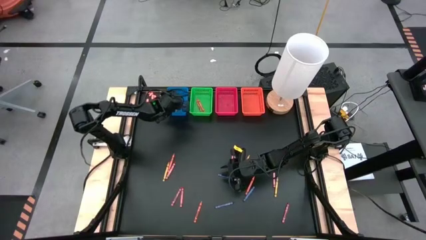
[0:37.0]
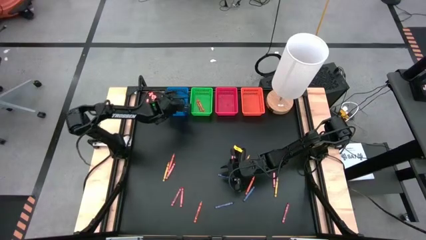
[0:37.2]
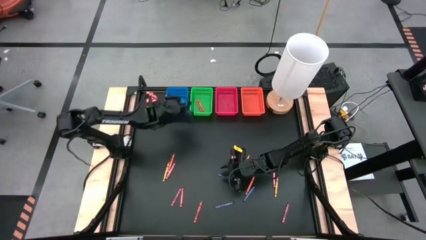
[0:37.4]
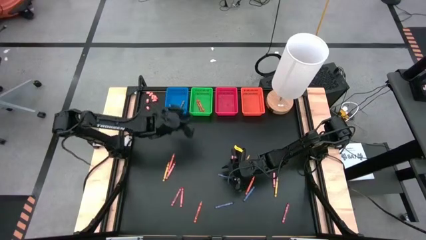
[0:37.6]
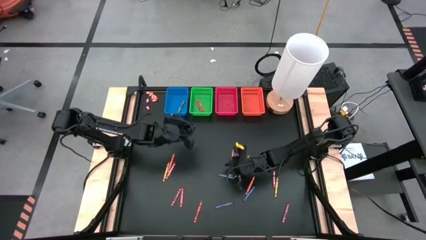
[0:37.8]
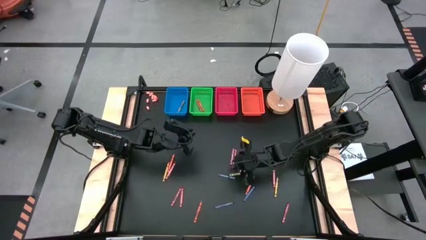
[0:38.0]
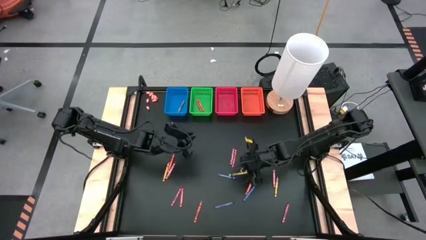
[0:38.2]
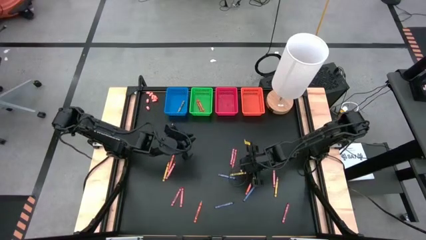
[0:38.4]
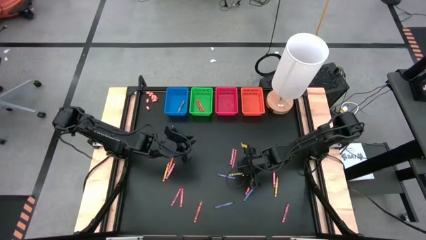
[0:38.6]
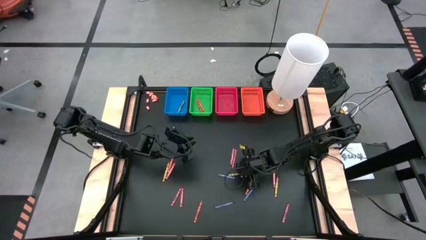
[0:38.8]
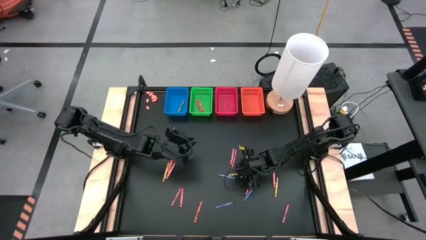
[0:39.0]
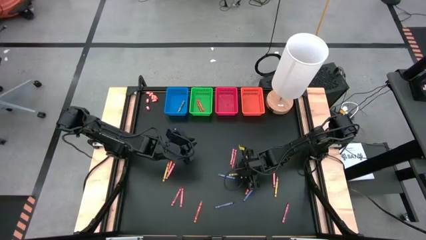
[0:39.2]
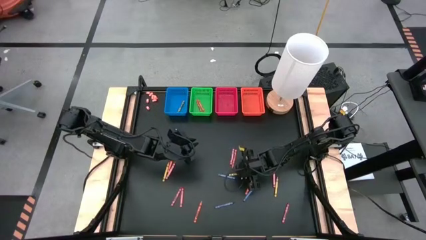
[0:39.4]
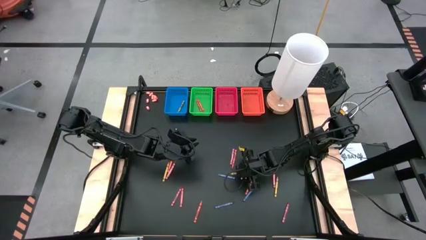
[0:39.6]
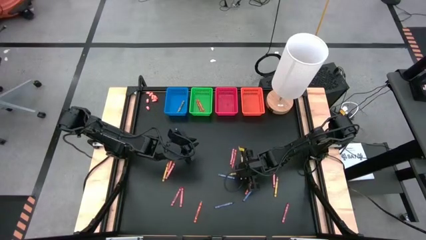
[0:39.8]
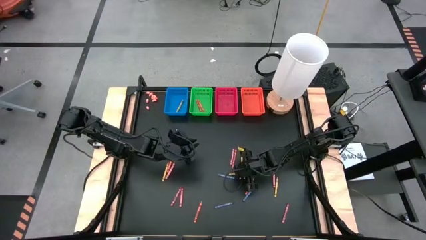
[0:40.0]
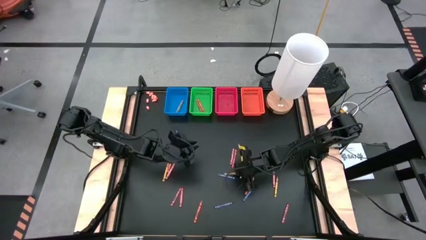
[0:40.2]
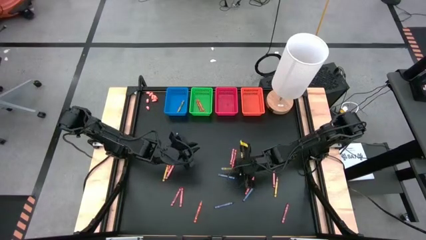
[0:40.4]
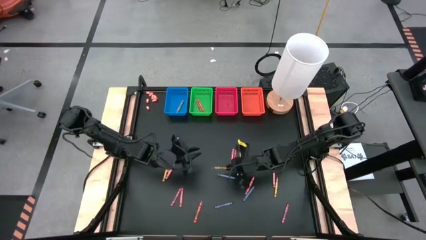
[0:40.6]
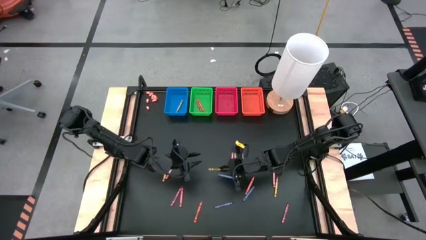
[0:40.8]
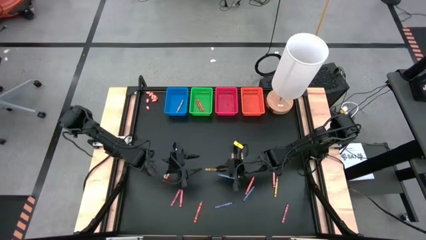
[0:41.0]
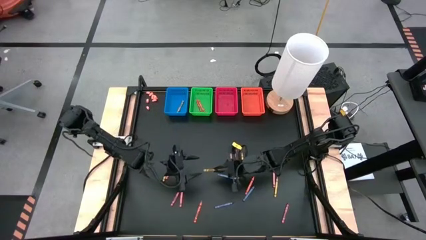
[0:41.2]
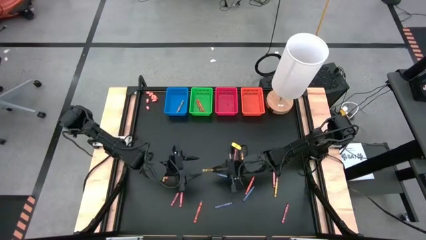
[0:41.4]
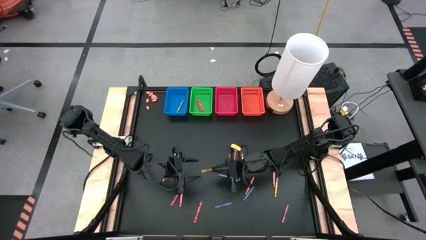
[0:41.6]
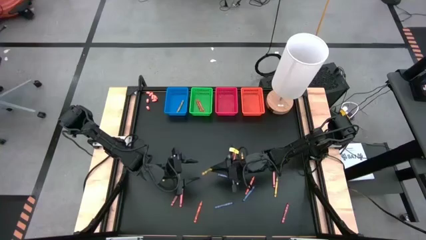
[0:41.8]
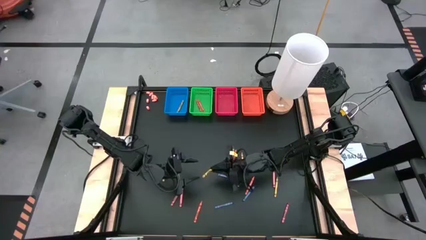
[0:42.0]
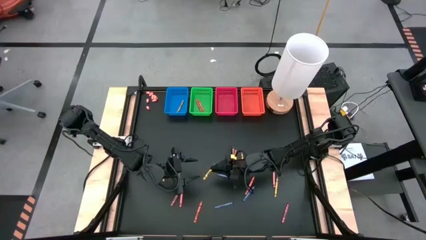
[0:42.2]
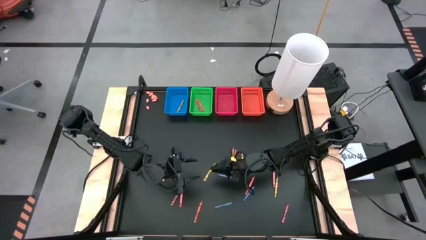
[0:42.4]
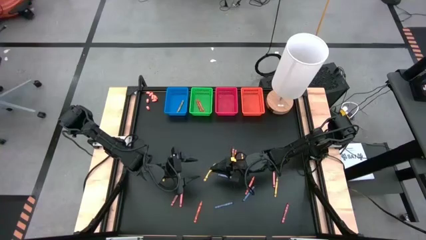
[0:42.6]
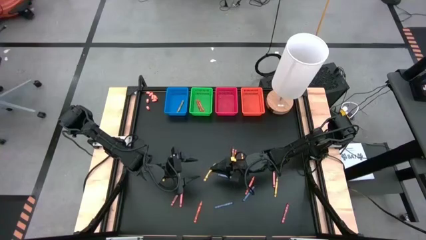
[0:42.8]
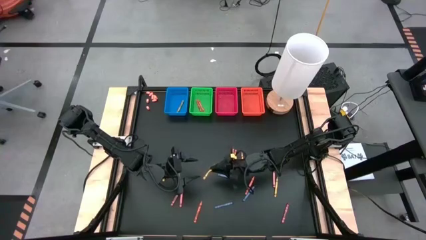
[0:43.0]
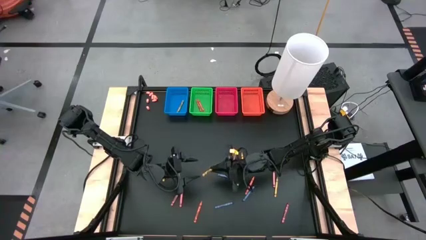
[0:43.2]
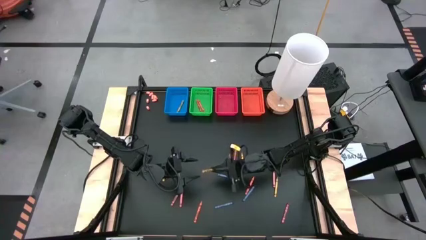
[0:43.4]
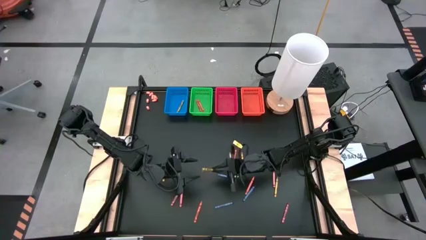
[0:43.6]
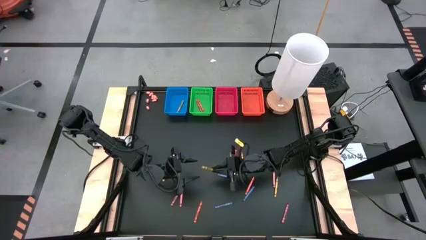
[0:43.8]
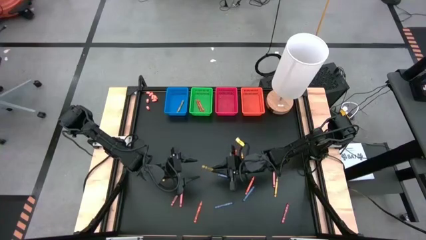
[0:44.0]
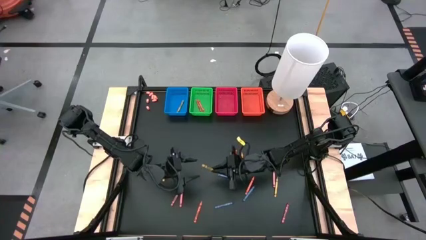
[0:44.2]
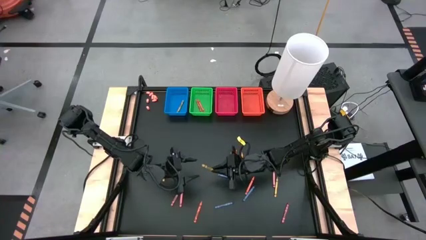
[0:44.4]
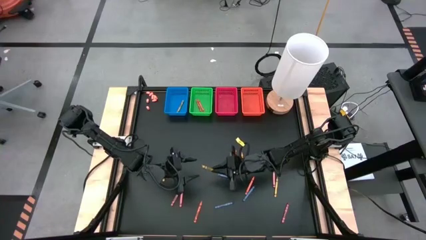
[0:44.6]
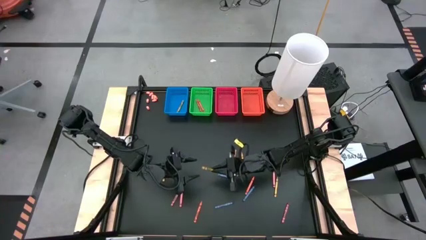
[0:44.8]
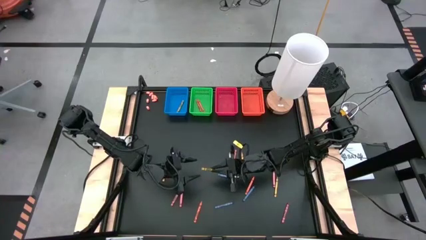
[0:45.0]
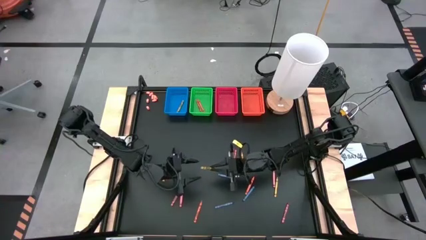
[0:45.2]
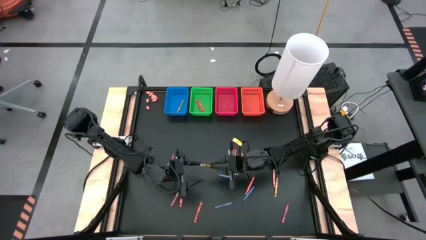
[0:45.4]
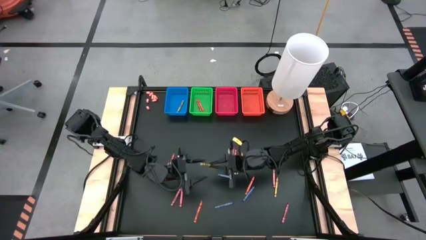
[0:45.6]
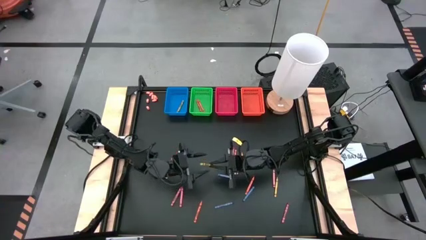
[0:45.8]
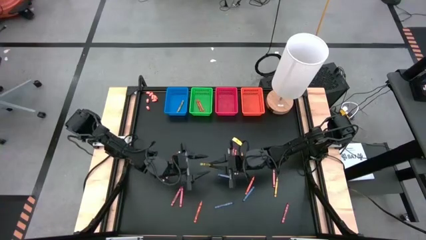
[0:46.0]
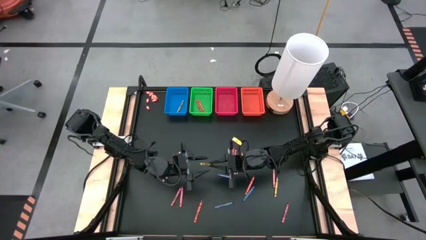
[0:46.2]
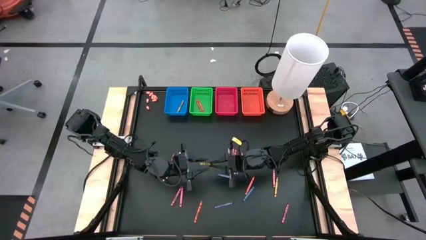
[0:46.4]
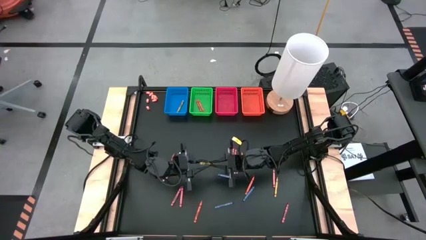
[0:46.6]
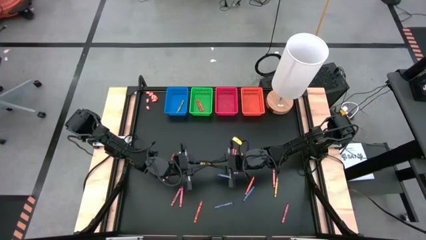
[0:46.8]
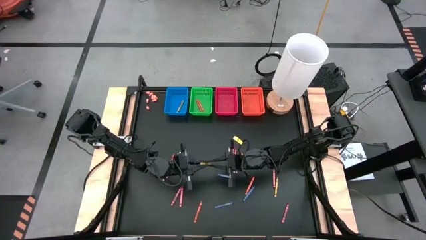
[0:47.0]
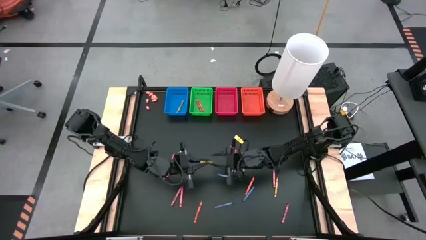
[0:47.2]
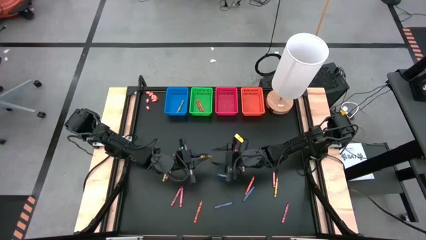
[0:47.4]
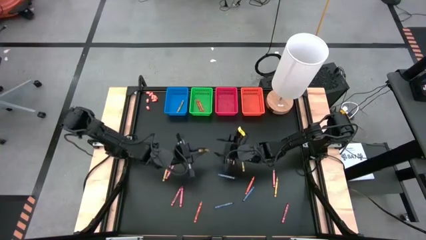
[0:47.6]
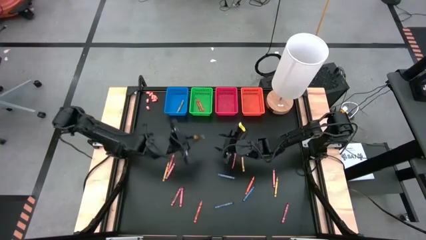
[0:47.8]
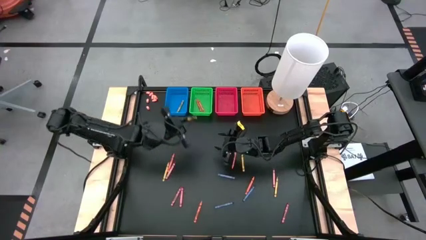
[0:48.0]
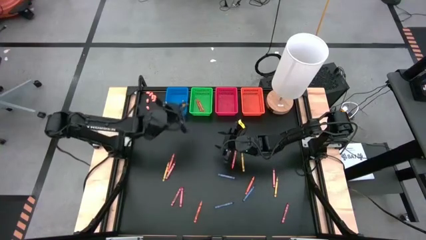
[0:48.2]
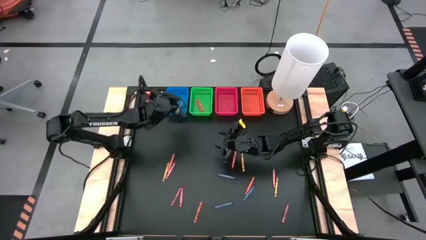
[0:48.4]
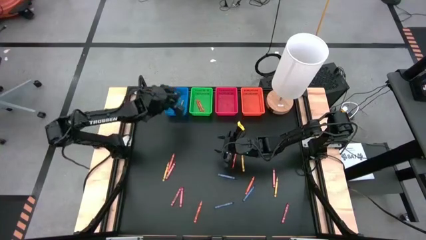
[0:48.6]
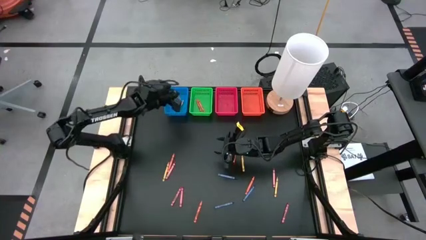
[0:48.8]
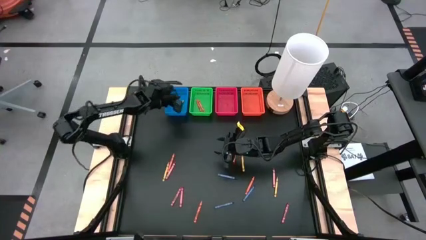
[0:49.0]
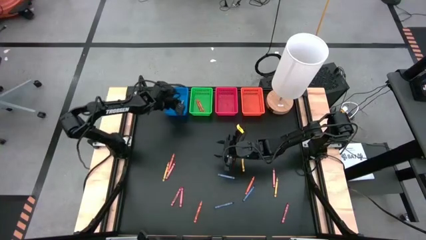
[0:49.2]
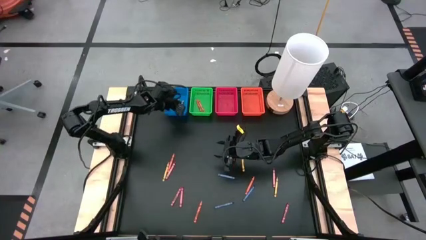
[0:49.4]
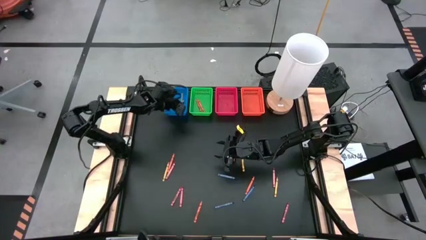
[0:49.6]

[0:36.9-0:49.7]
Task: Sort crayons
Put the yellow crayon into the blue bin

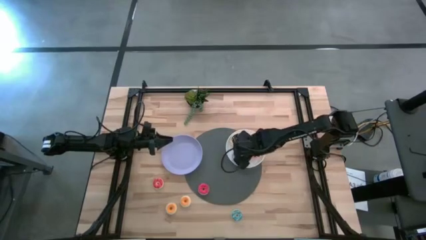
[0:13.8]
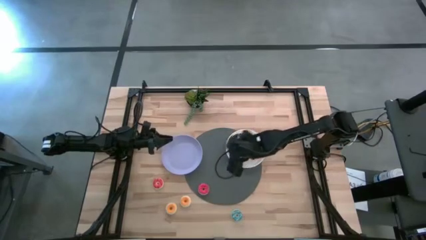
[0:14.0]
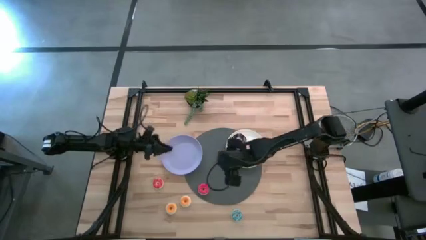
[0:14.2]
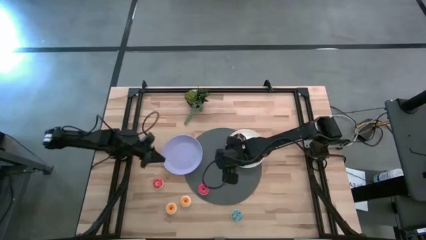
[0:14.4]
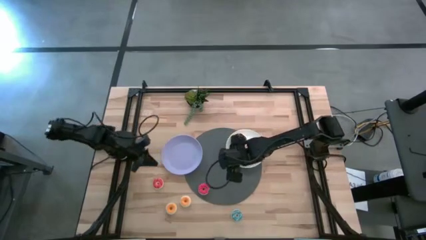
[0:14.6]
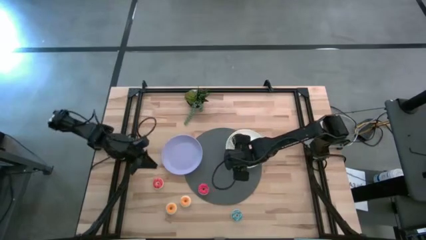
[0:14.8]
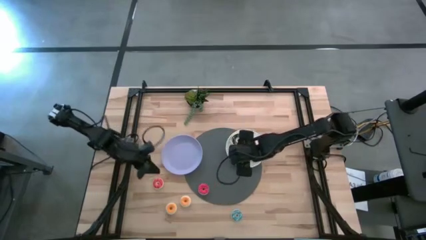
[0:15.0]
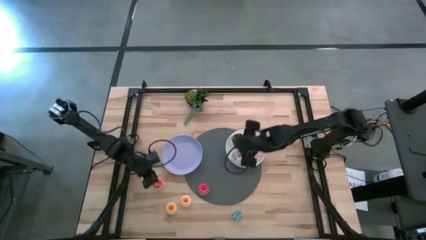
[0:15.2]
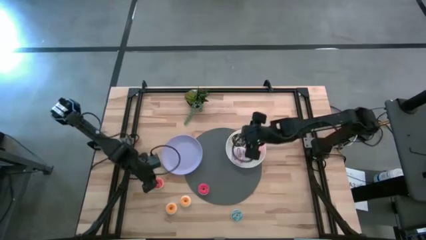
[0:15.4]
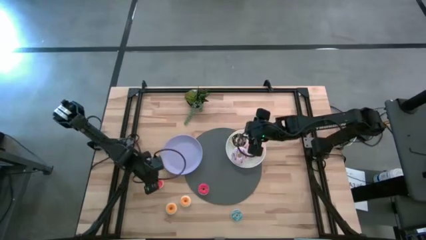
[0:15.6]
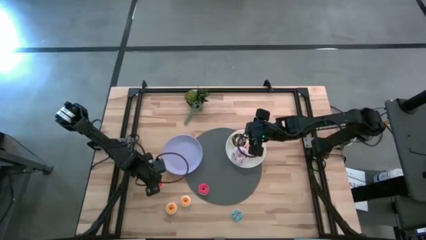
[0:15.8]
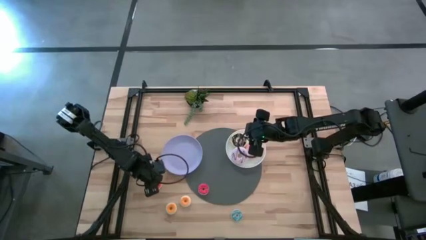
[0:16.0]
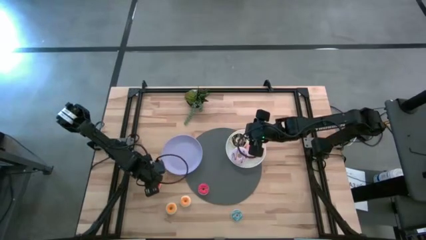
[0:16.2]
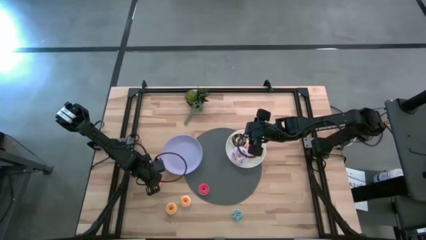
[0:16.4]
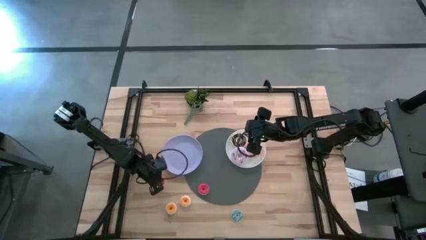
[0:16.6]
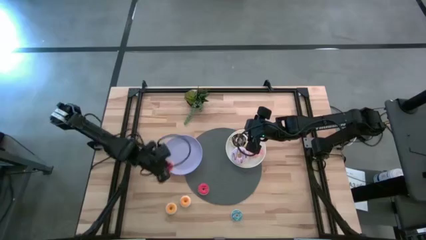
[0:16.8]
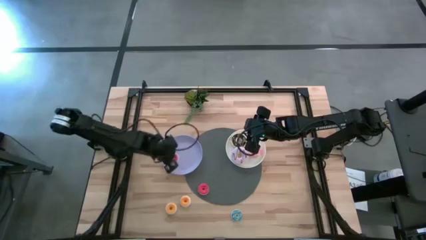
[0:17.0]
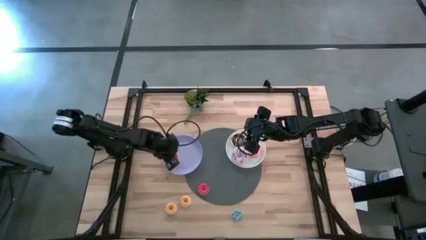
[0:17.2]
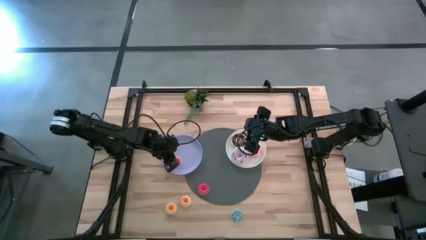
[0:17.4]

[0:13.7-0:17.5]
Task: Pick & Place donuts
Put the small orange donut on the purple plate
